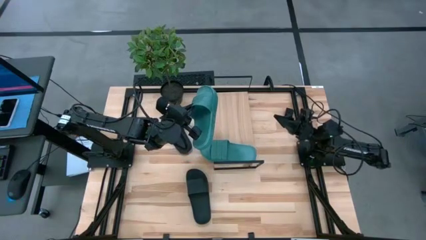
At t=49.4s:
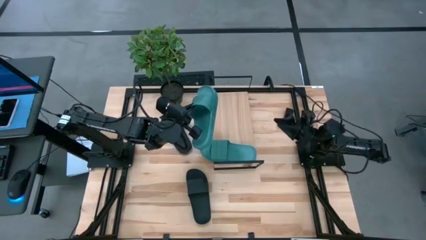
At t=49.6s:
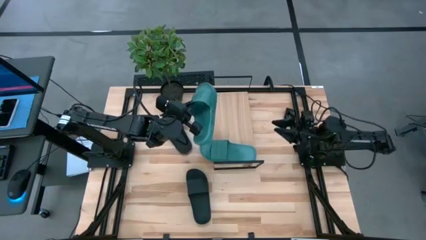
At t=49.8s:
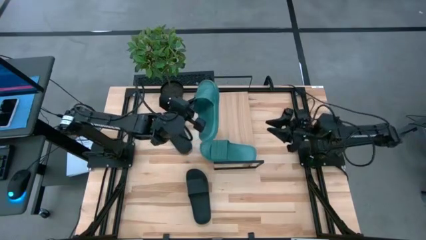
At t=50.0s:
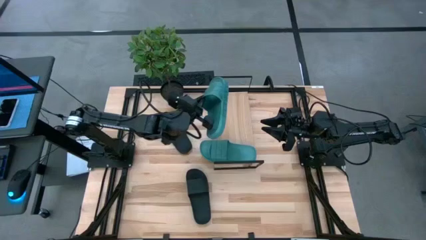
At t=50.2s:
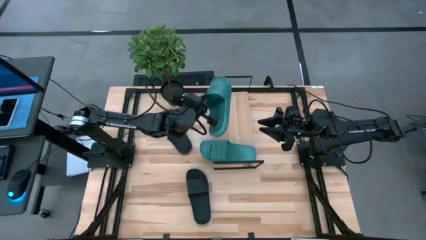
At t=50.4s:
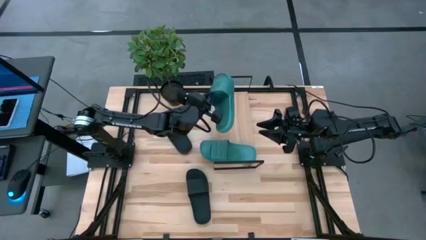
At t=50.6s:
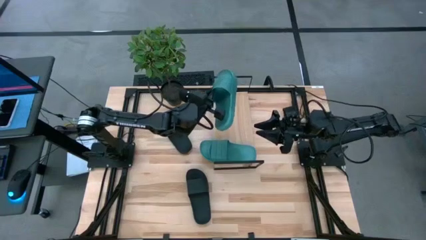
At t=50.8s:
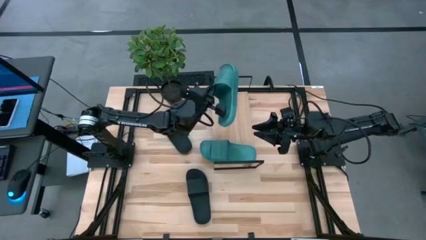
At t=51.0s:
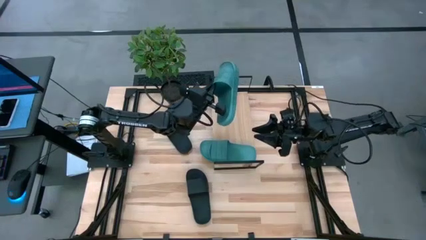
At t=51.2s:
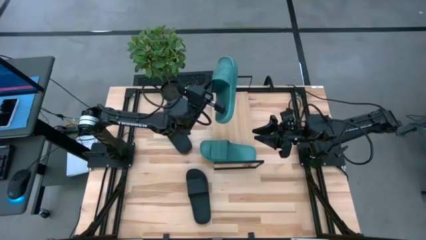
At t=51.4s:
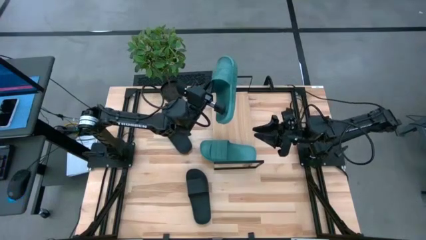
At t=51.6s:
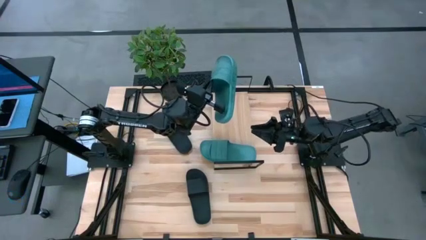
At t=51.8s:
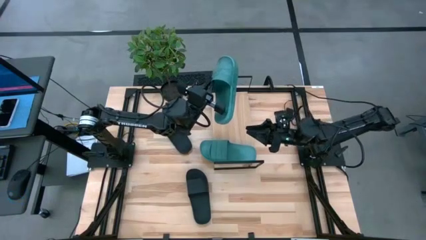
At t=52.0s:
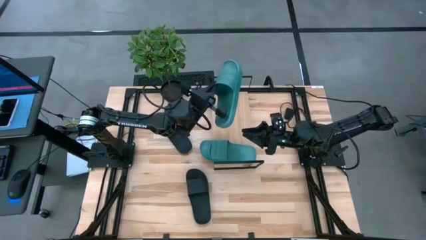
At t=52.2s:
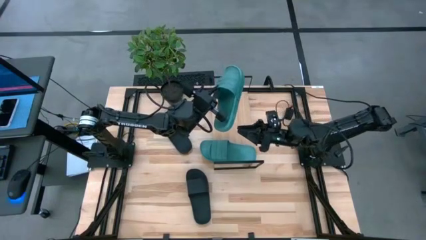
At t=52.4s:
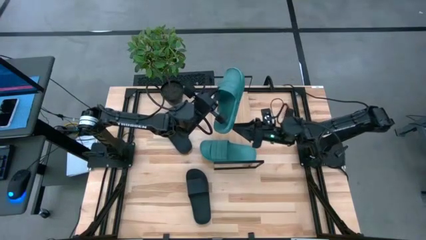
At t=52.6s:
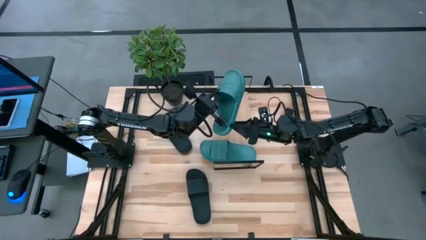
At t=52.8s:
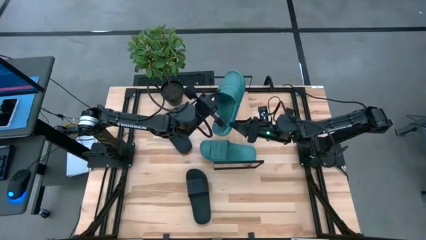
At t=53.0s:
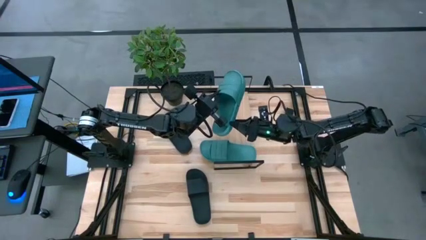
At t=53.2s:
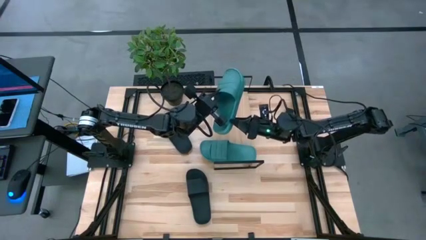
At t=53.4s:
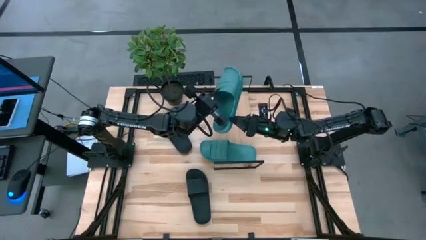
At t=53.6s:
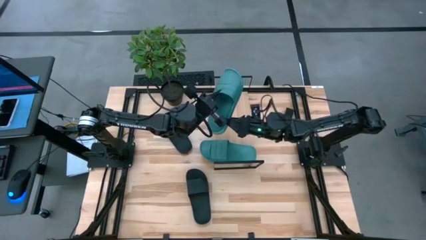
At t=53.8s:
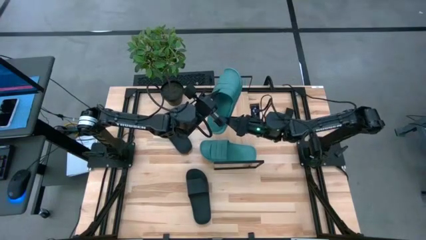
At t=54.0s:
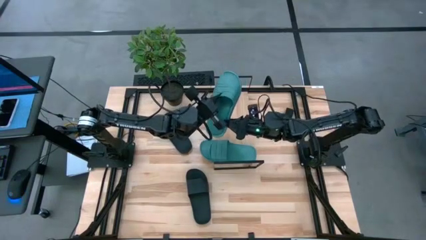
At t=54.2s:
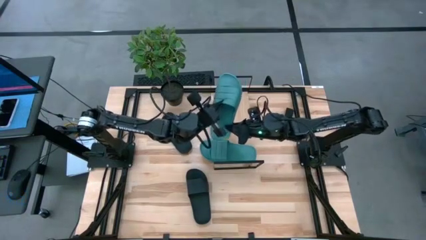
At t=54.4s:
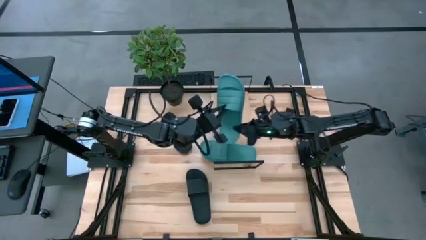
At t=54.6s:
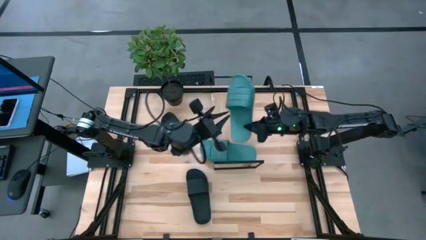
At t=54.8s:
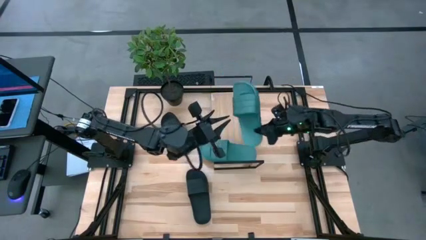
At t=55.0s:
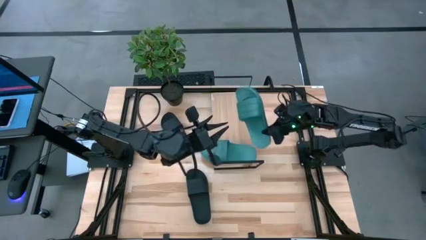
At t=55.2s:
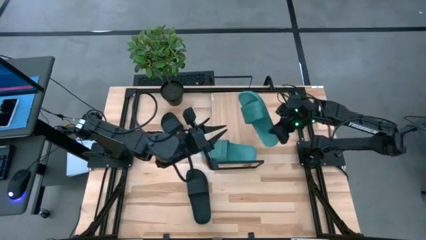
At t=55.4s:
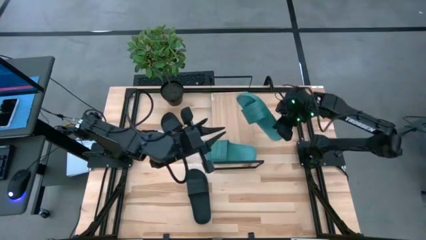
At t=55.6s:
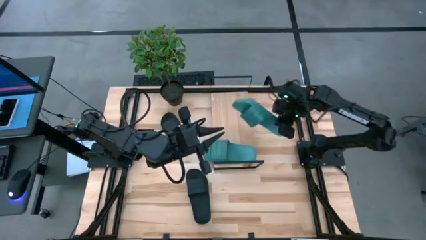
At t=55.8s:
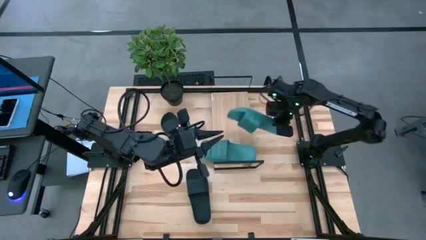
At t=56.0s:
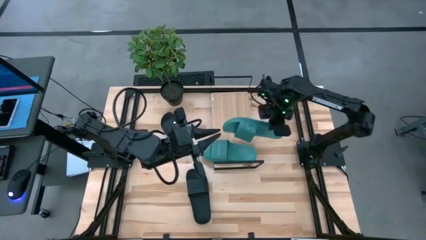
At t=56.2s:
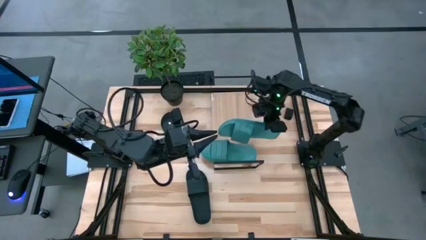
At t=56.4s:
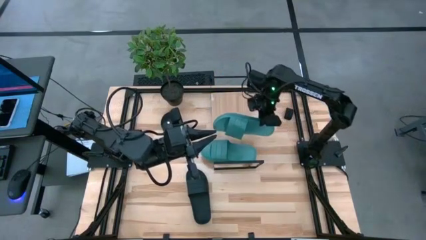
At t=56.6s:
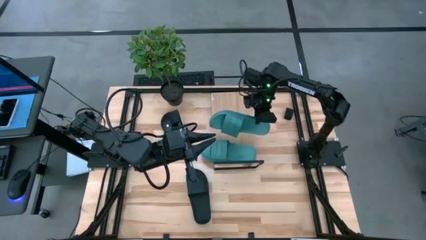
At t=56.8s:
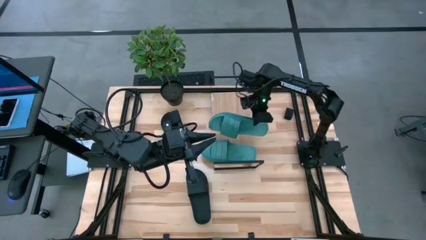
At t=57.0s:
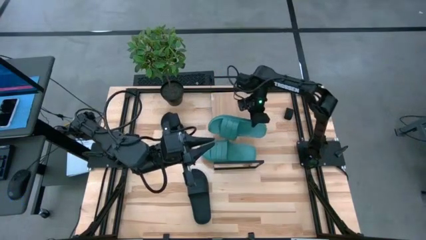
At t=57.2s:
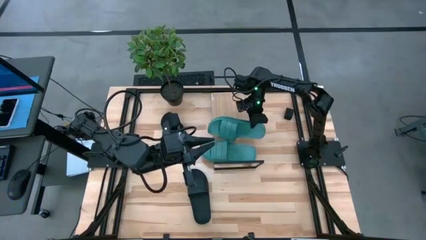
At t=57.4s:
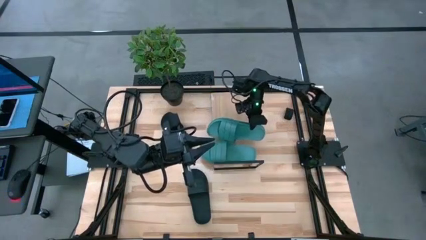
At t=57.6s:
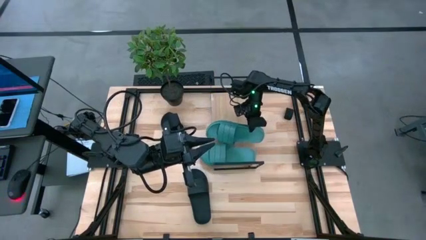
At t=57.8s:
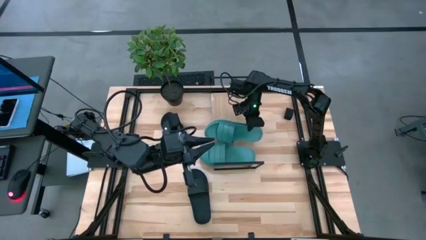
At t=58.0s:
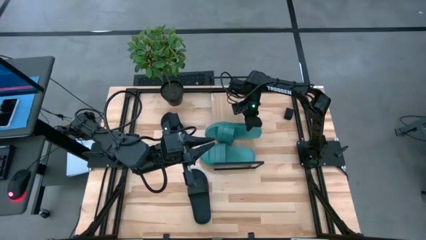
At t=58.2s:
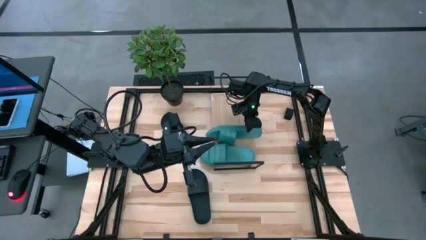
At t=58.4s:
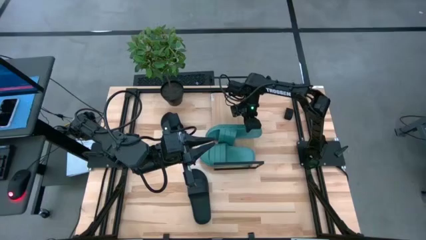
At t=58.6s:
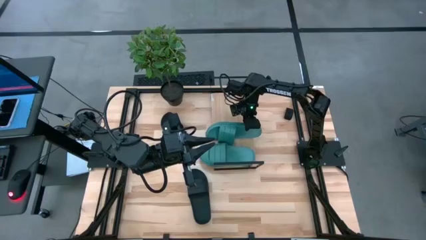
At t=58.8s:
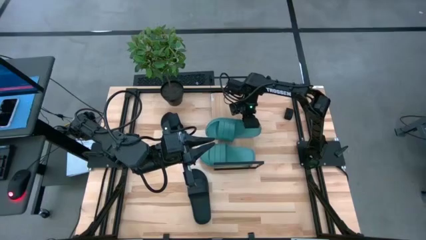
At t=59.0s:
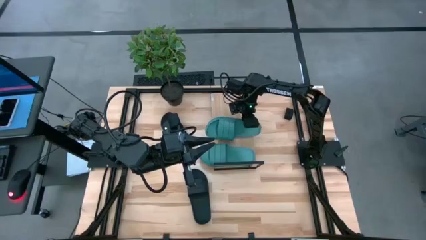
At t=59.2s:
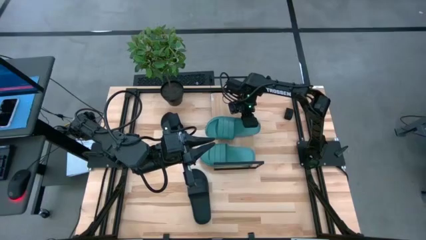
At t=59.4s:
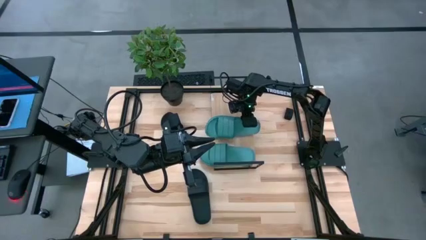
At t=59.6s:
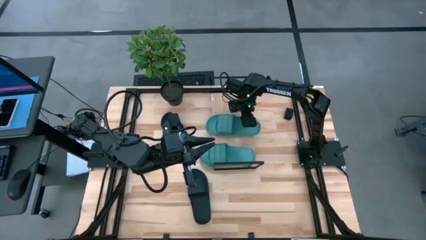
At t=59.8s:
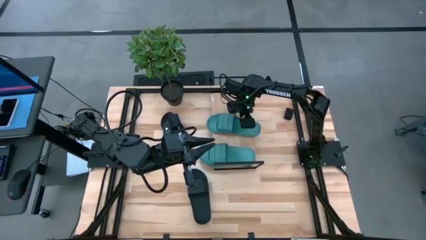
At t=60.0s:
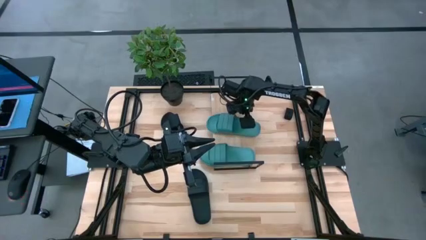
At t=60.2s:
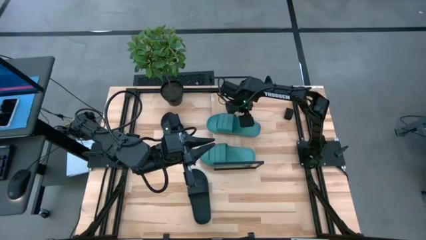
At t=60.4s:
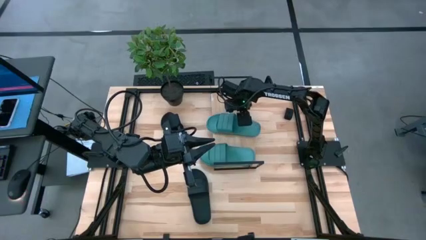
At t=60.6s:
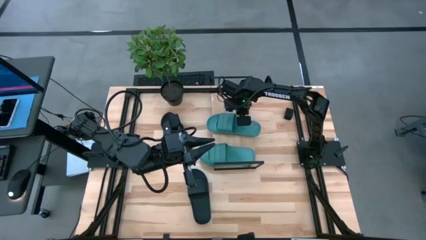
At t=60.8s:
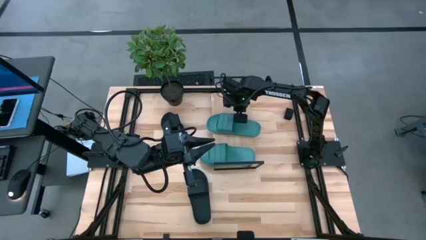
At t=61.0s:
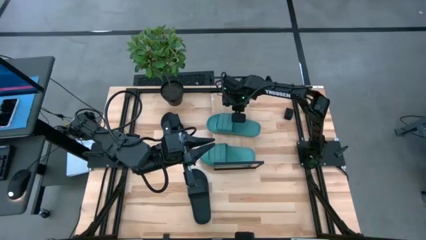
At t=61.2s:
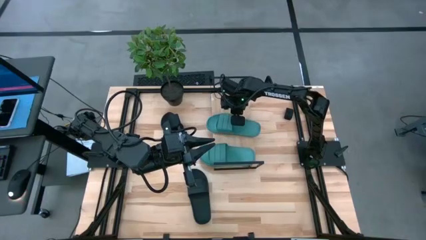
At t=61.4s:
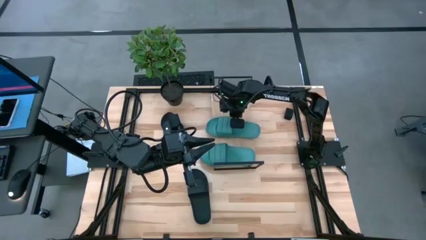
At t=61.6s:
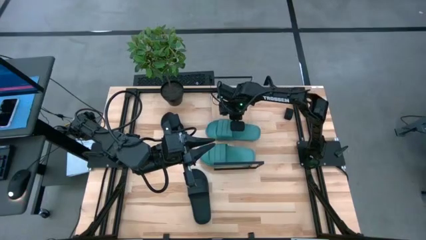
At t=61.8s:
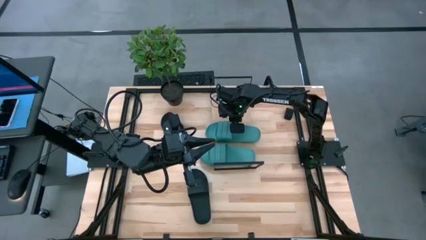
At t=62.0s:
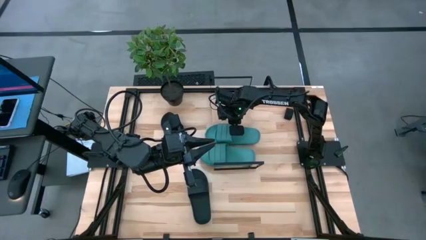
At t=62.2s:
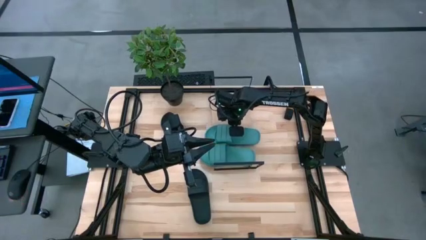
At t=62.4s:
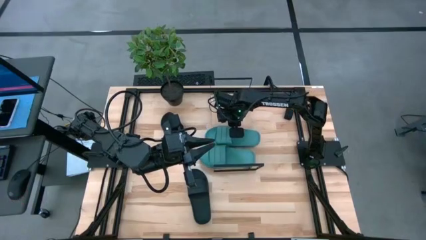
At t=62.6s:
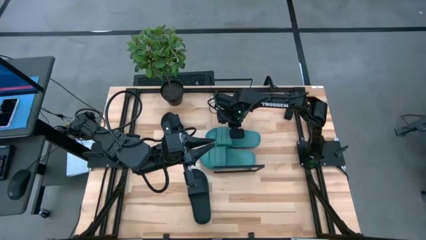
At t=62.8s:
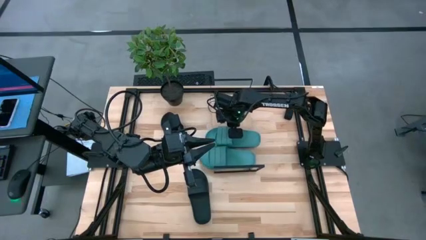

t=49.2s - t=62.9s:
Task: Pick and place slides into the shelf
Put the green slide on the shelf

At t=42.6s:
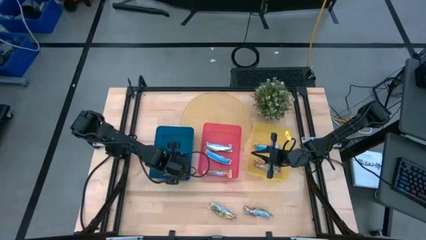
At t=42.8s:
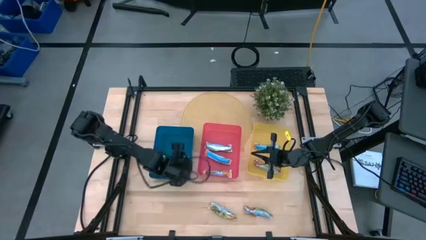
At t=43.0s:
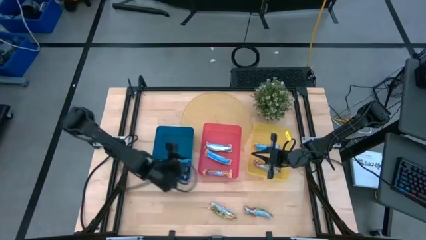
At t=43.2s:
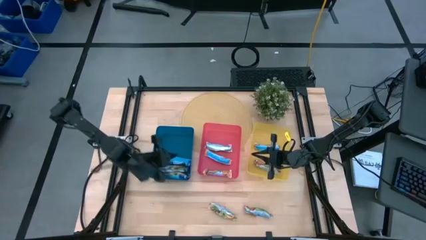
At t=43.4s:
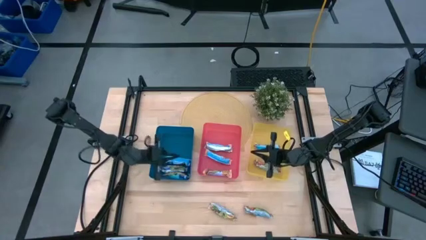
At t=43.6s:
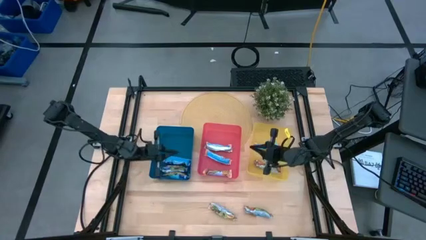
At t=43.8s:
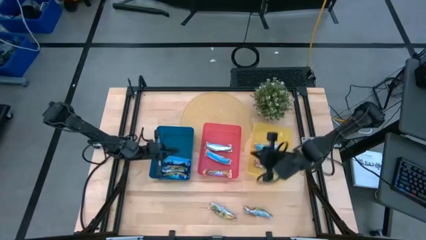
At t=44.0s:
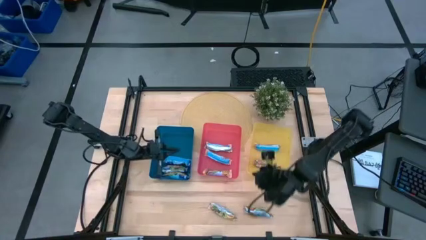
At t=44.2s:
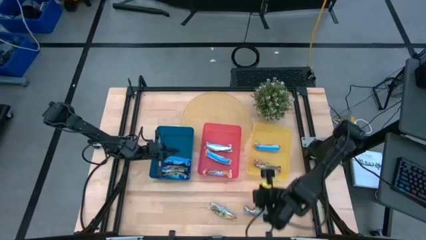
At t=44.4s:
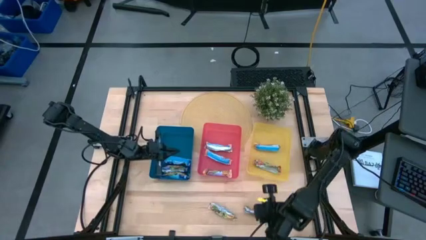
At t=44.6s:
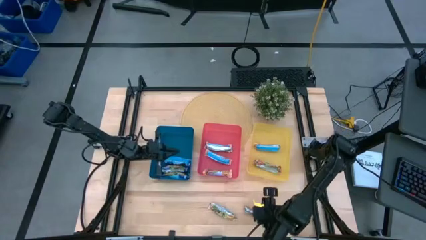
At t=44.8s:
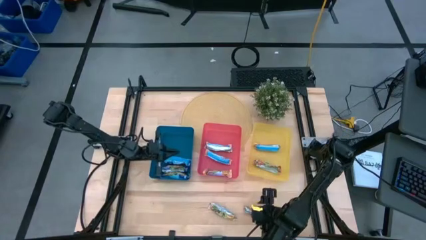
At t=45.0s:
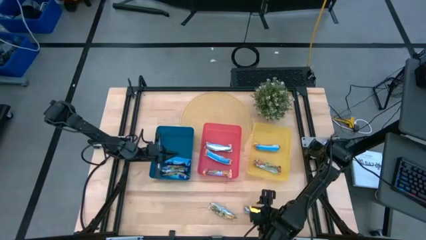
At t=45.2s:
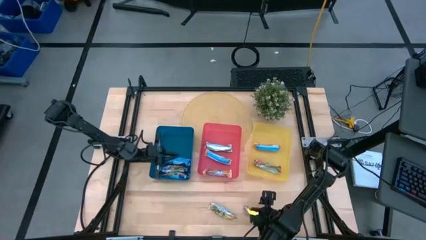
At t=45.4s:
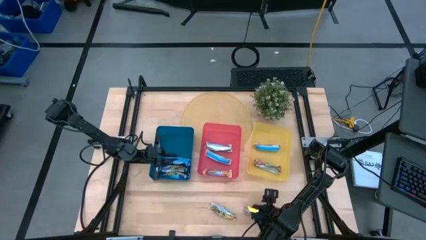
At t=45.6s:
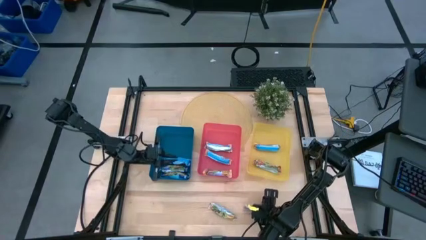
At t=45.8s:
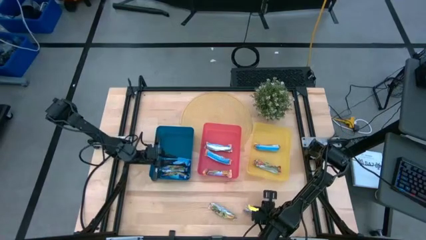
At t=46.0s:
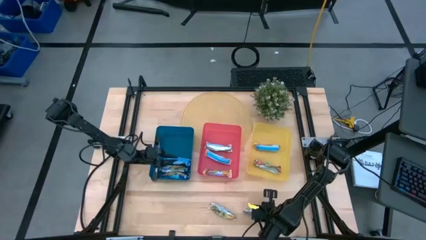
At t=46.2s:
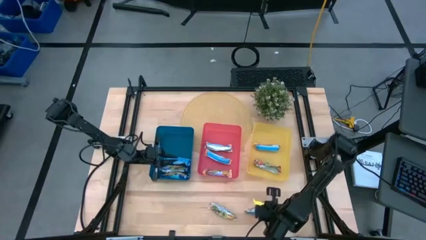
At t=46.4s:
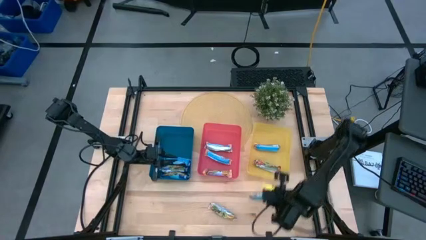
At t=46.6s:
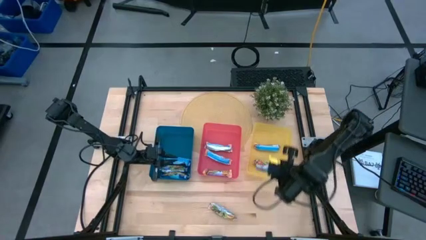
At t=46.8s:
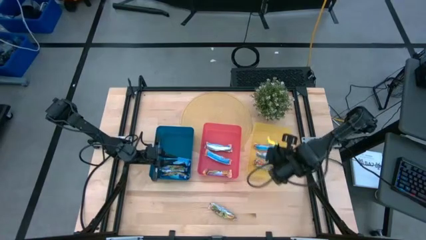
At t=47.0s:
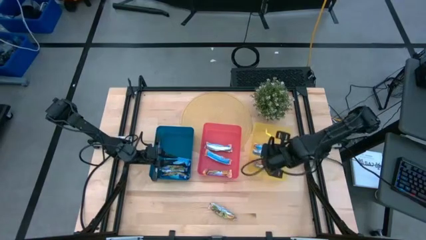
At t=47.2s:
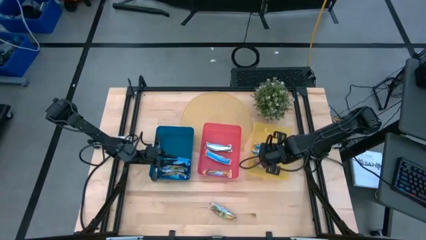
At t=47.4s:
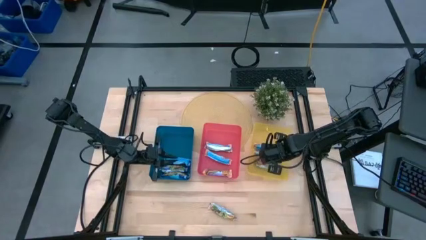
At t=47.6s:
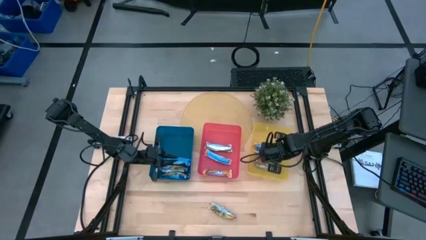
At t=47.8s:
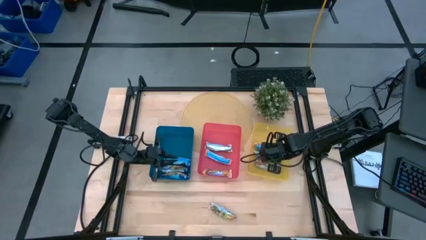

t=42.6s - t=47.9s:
Task: Pick and place Granola Bars by type
Put the red granola bar into the yellow bin
